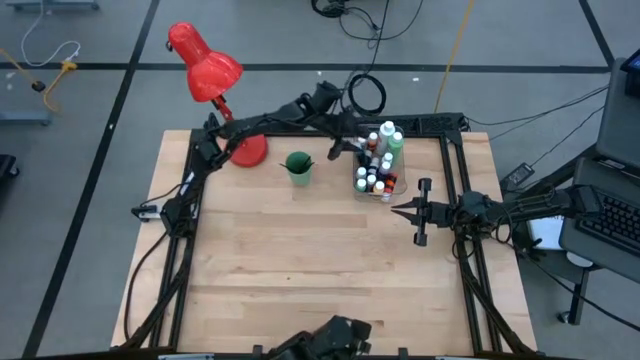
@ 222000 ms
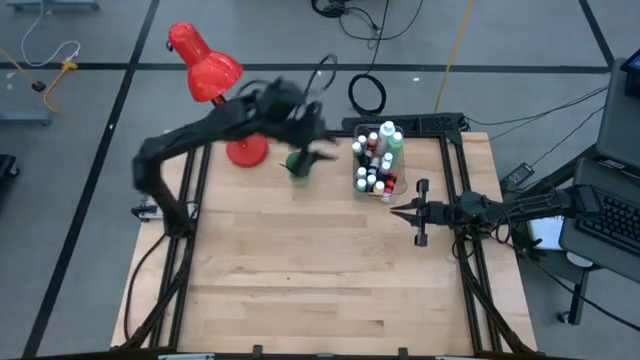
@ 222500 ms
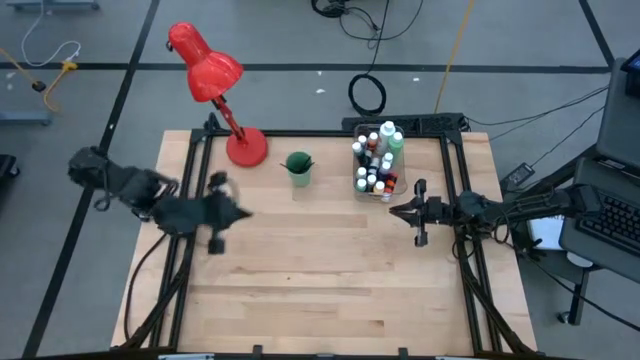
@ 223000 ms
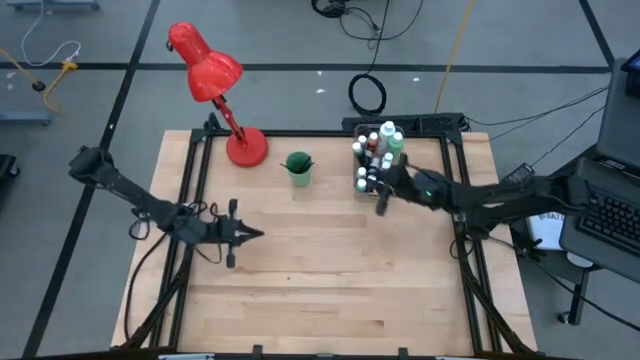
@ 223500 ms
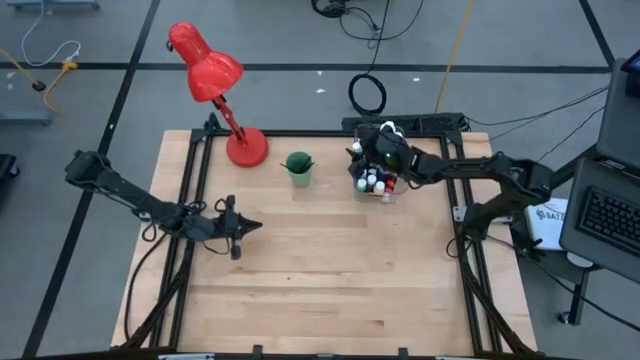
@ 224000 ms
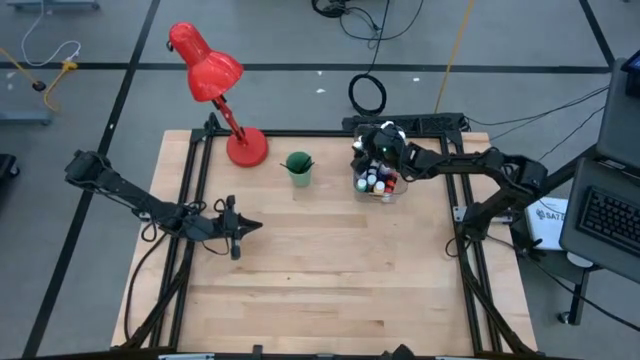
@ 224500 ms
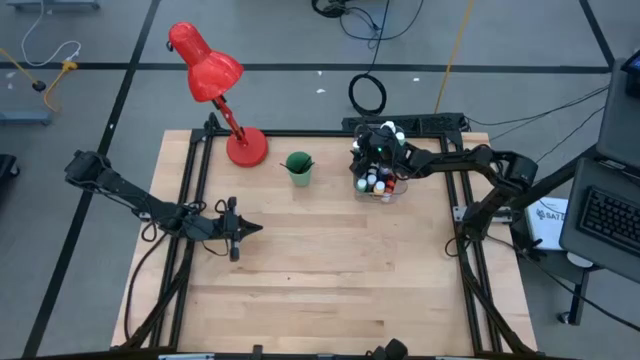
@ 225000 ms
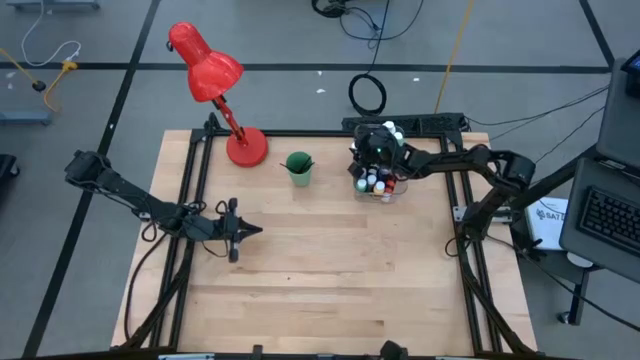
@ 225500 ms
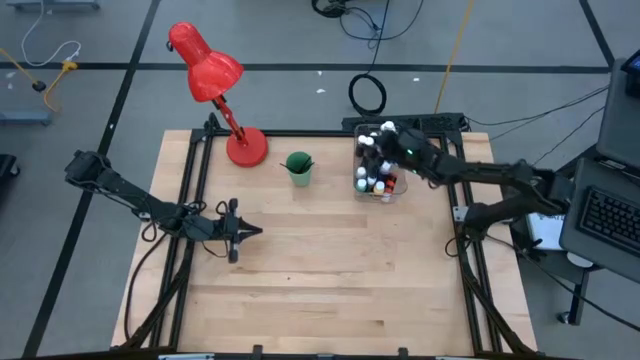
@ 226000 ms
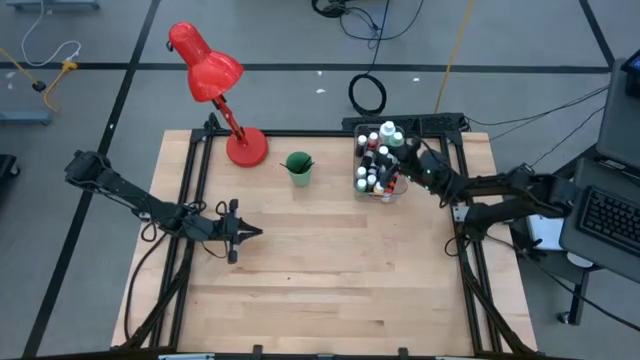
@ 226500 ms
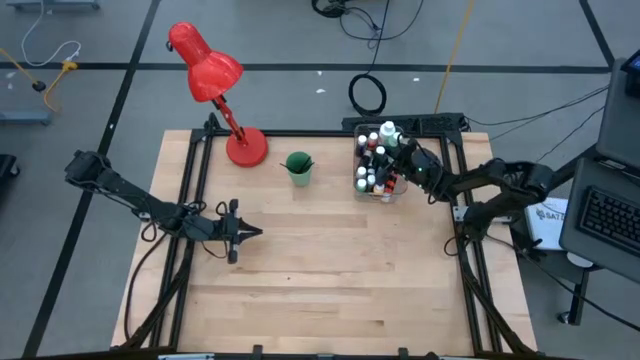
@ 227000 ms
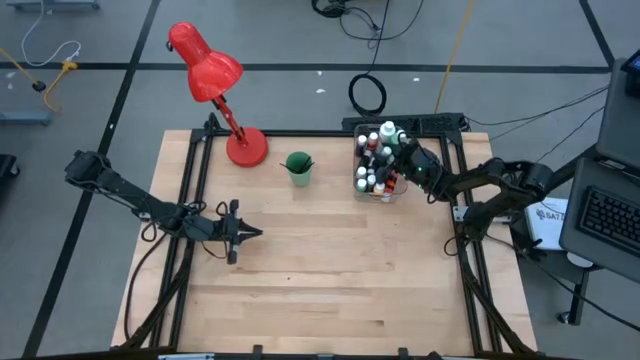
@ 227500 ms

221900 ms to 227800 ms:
Task: Pick & Place Paint Supplies
Adjust the dark green paint bottle into the transparent bin

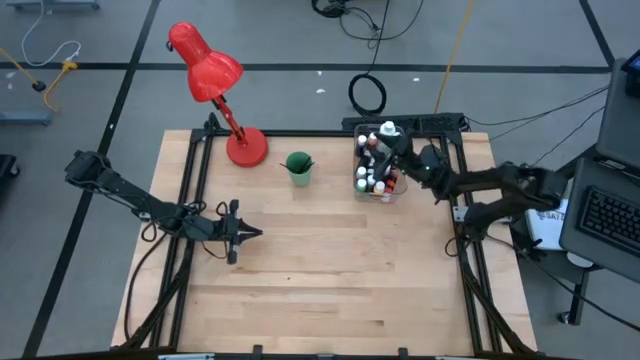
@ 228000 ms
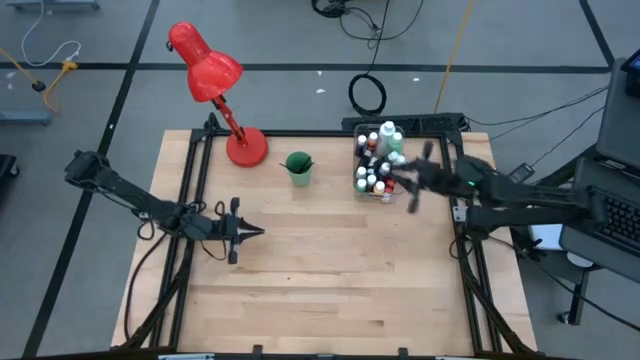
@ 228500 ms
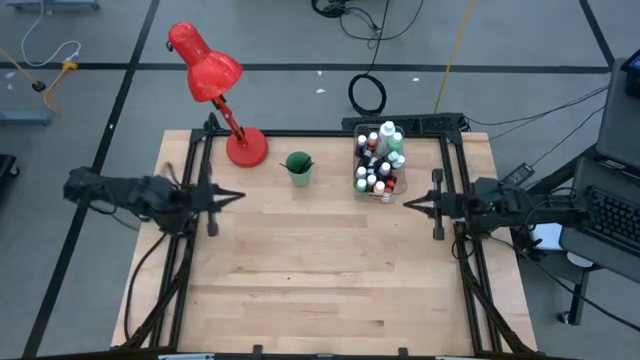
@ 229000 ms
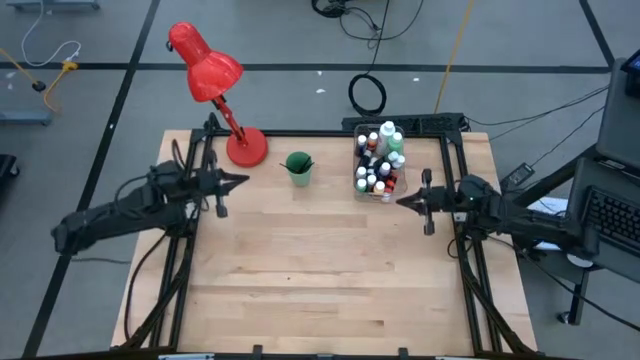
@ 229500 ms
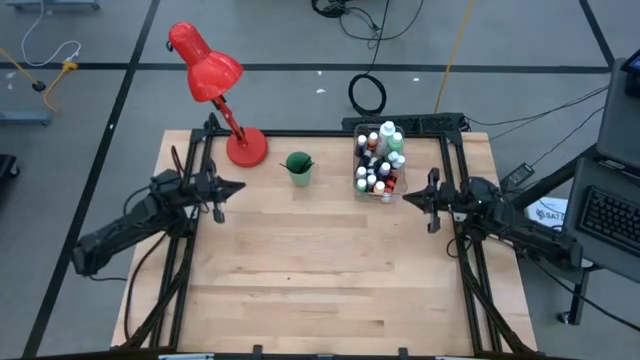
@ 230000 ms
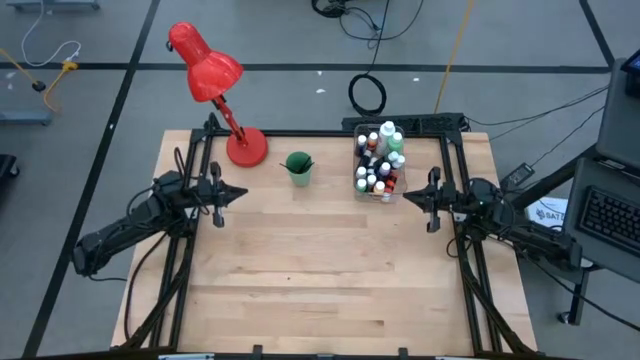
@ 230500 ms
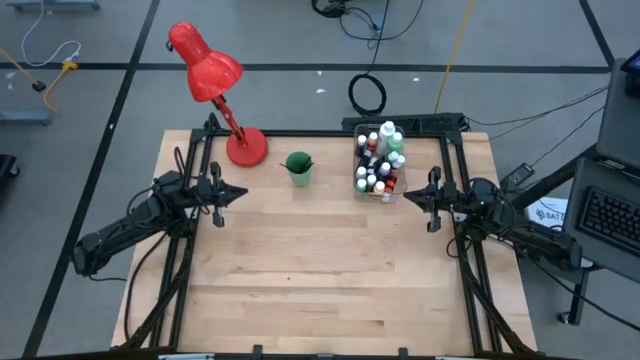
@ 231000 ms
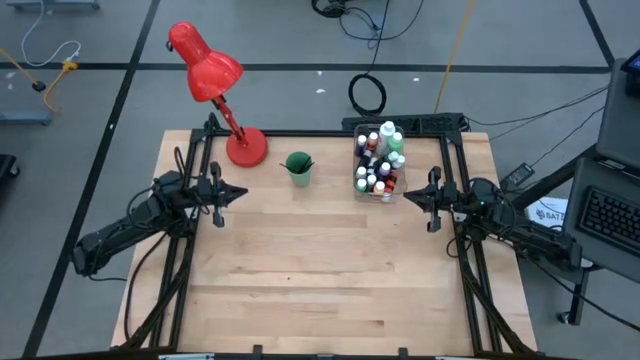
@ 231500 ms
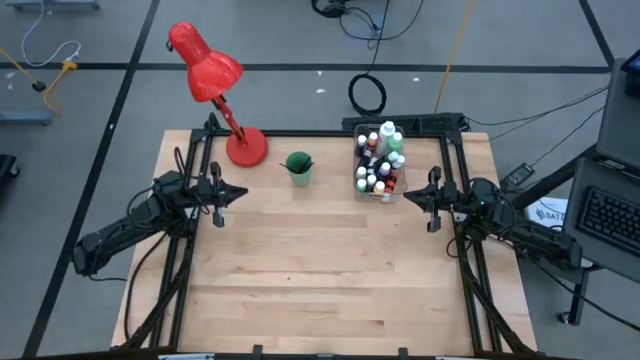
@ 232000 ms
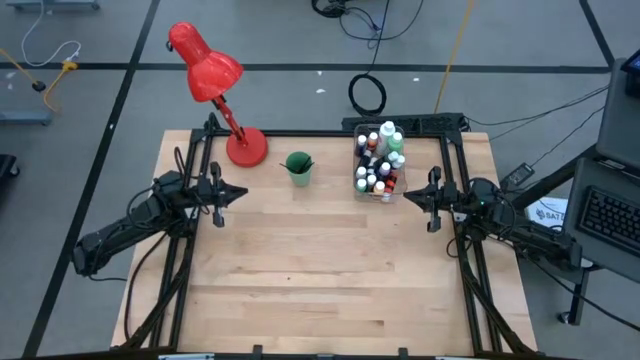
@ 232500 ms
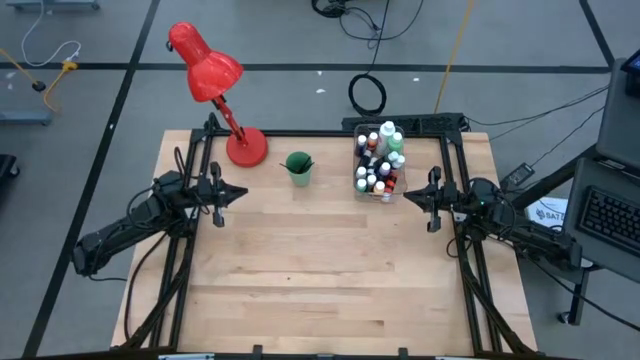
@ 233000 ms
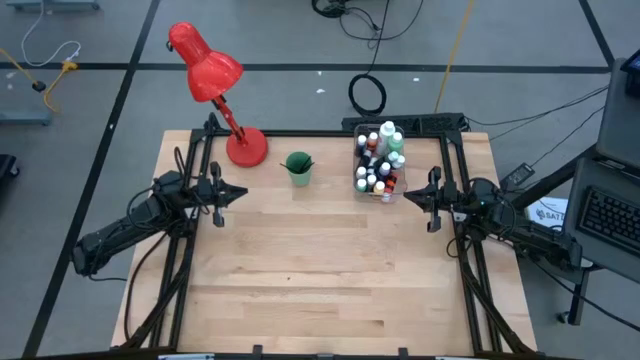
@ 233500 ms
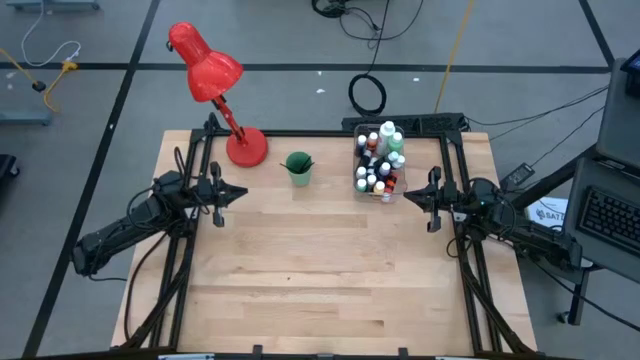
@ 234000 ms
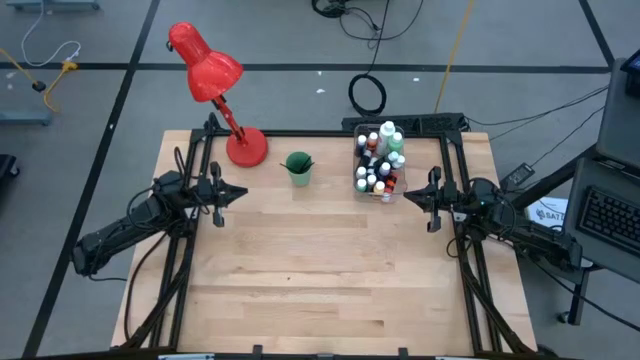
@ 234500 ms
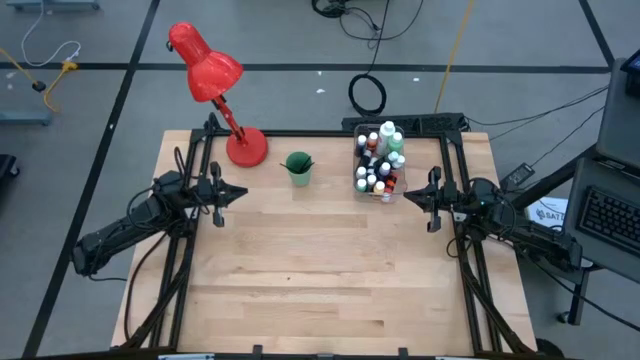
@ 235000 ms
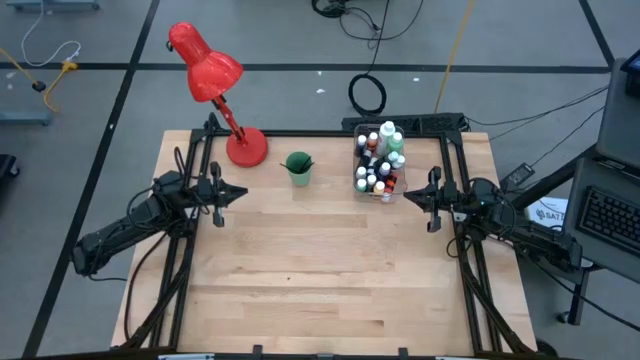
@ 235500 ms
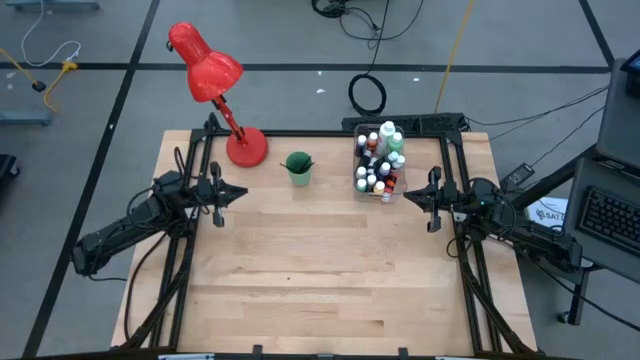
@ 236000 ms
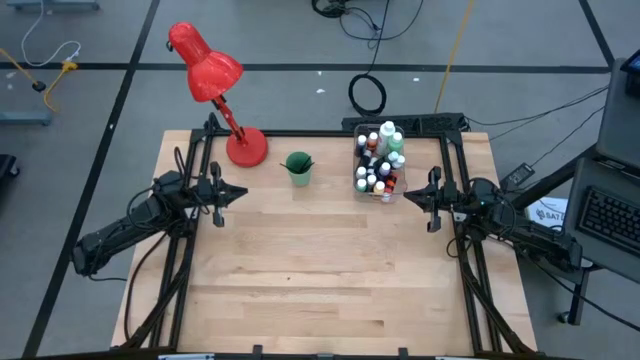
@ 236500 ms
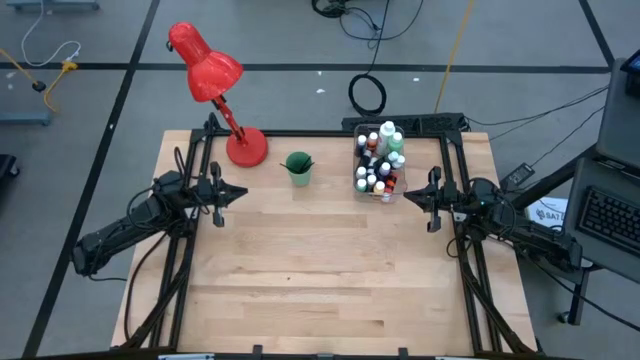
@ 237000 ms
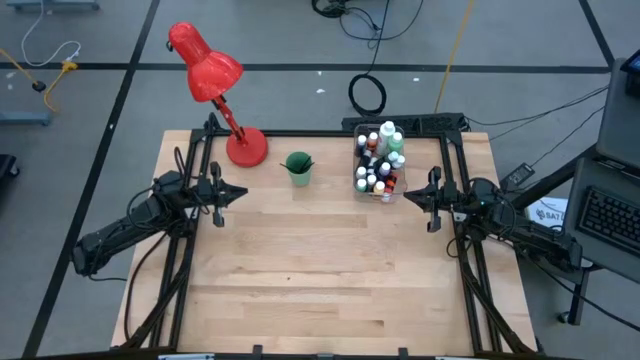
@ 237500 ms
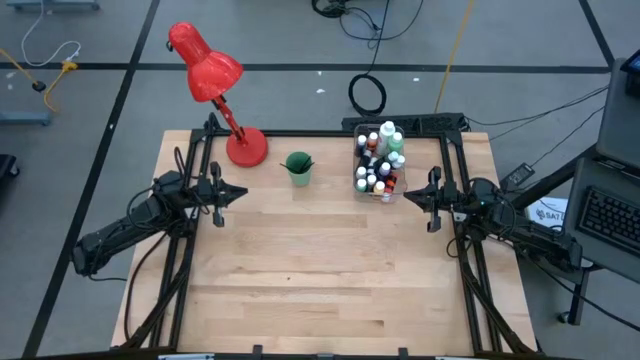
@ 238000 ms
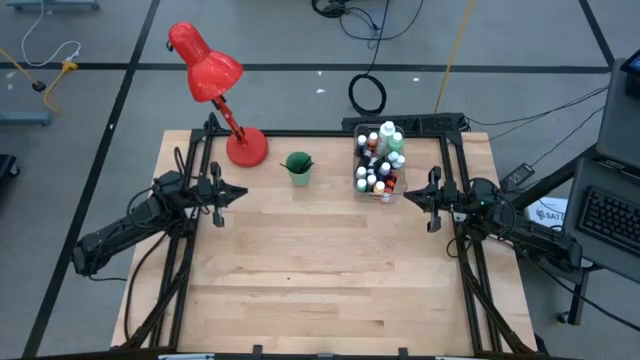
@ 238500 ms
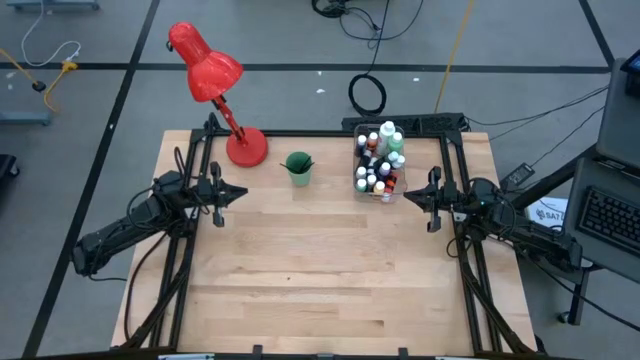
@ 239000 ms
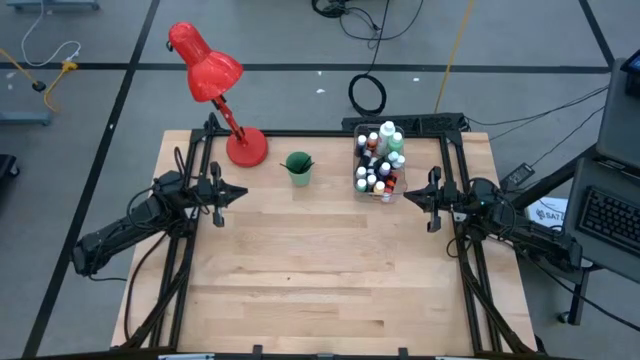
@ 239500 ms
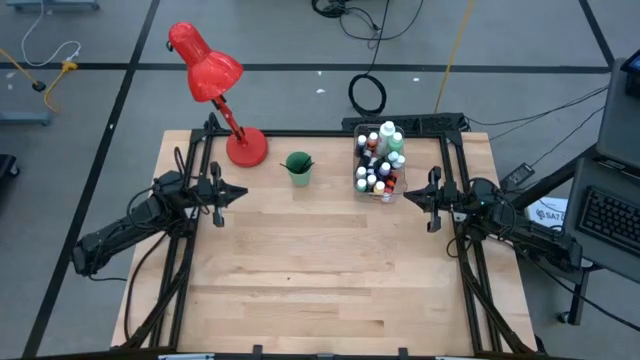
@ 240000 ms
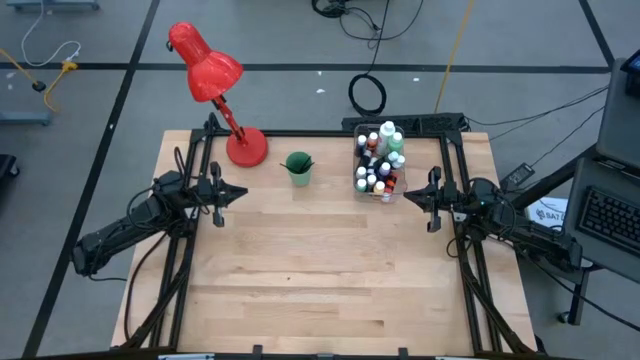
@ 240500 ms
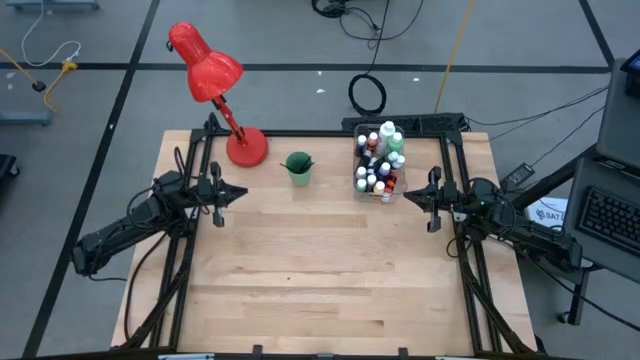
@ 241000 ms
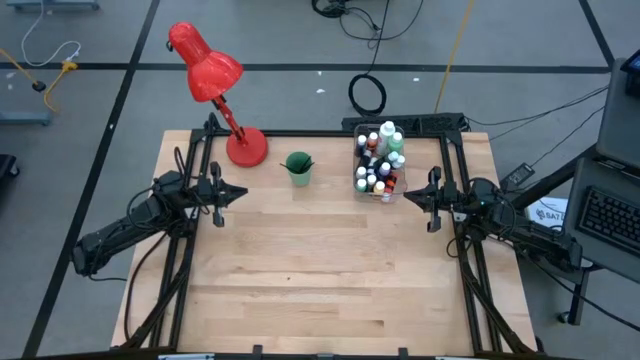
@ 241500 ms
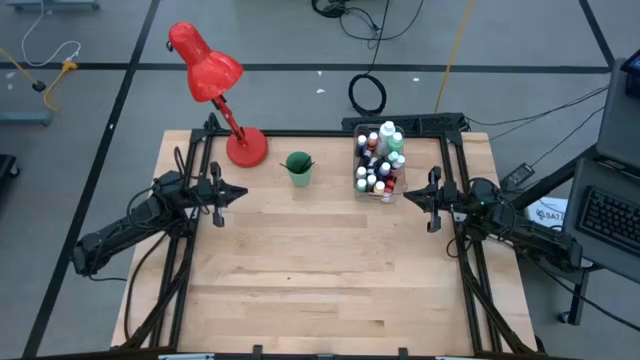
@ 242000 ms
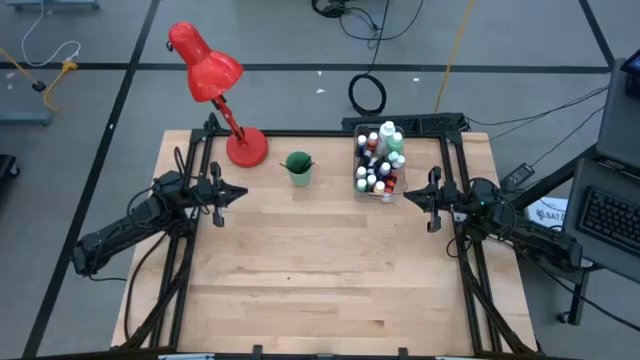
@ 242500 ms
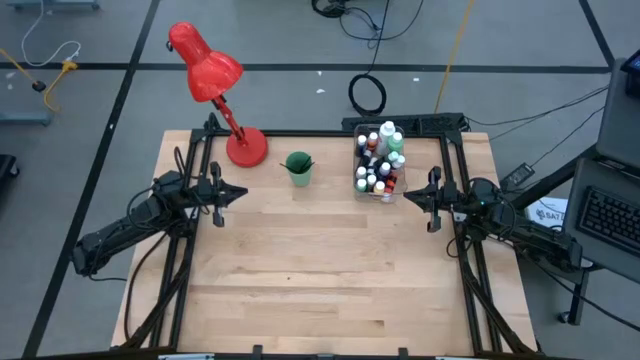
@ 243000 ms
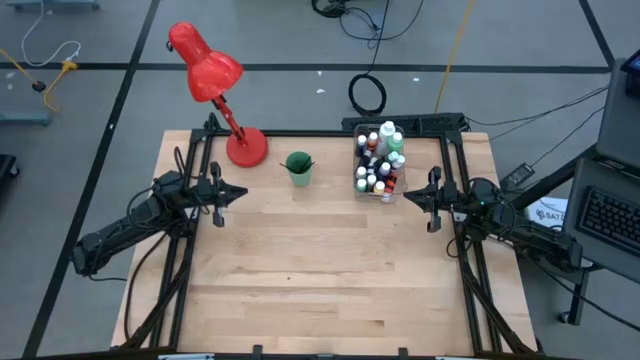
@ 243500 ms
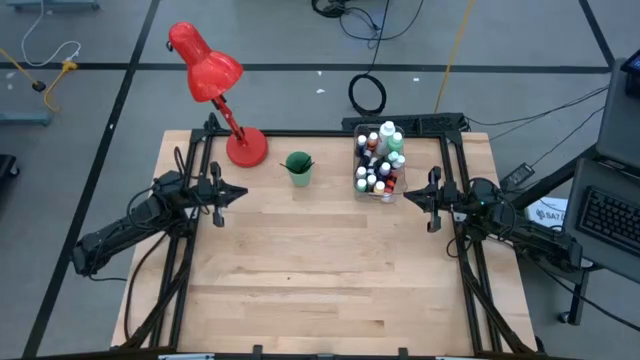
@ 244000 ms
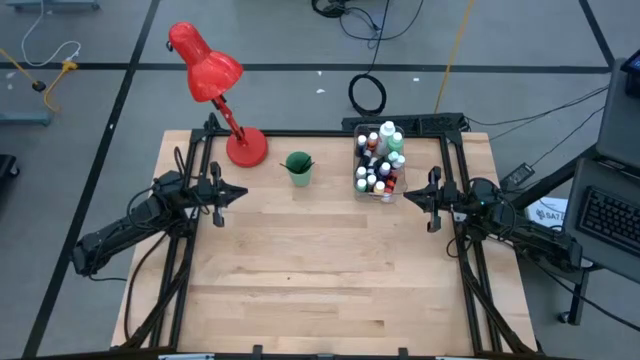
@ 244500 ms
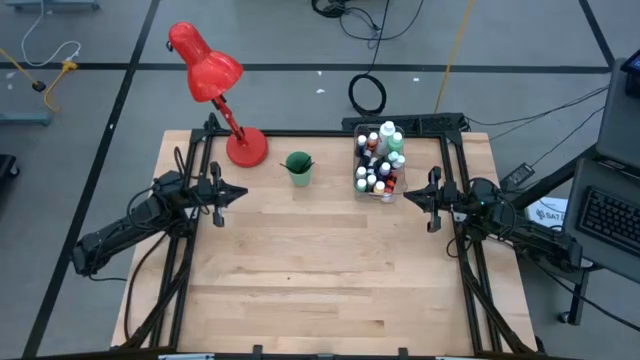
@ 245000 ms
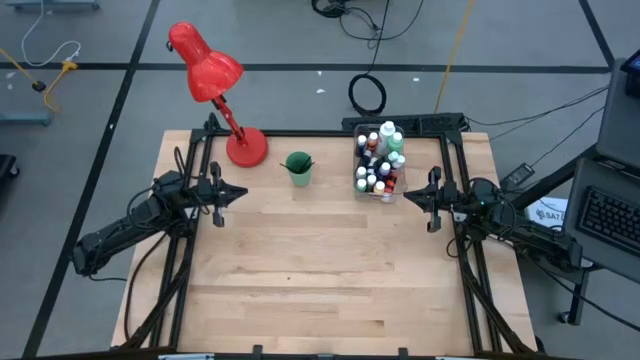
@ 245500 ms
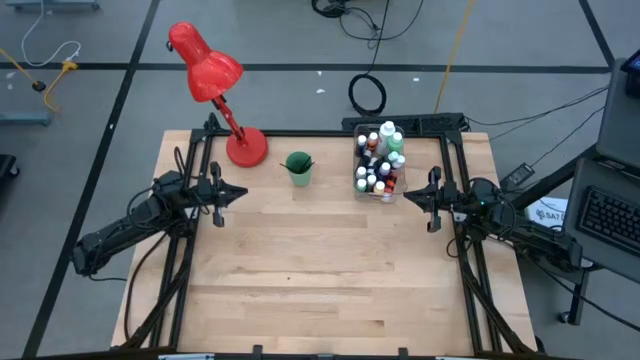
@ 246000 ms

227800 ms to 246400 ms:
Return to Home Position
